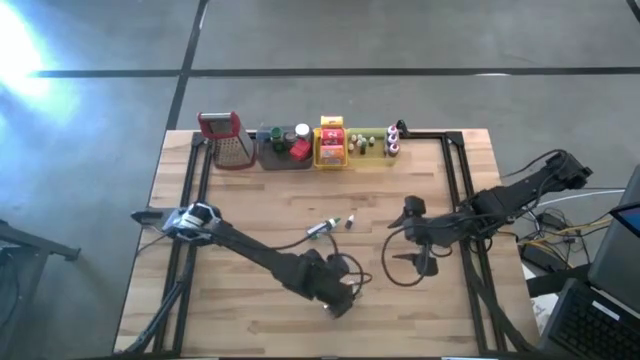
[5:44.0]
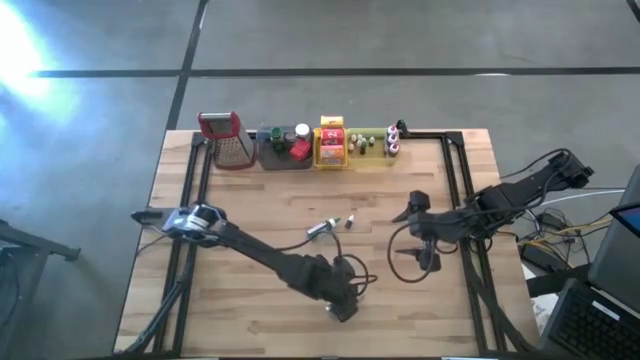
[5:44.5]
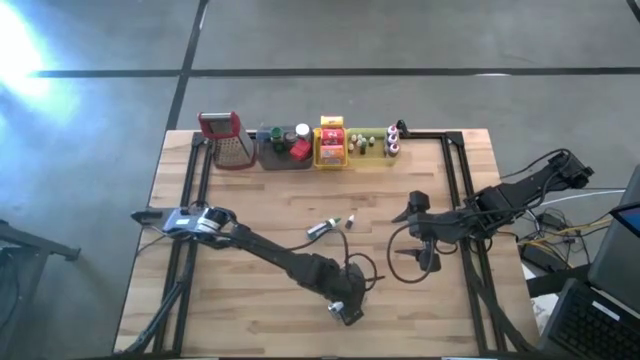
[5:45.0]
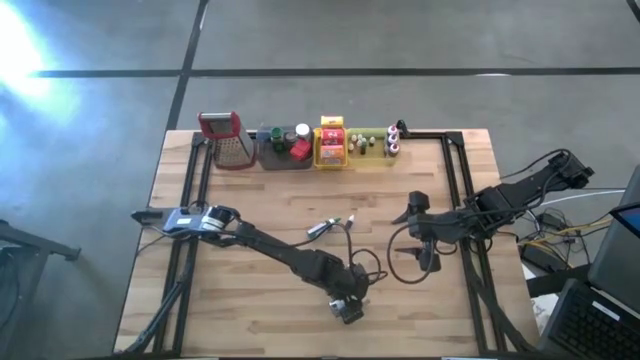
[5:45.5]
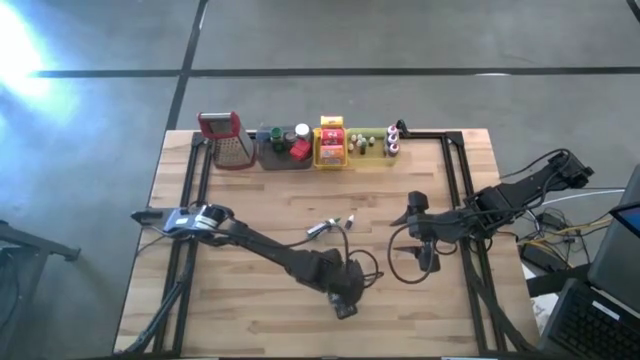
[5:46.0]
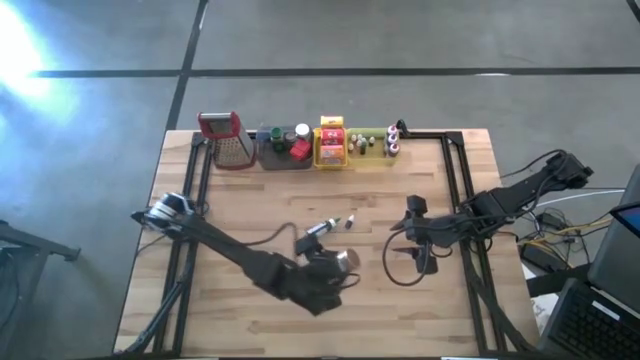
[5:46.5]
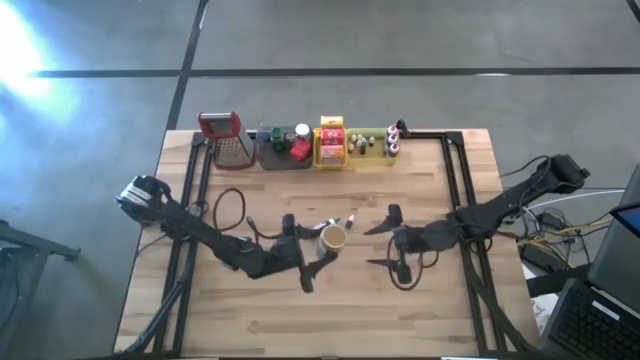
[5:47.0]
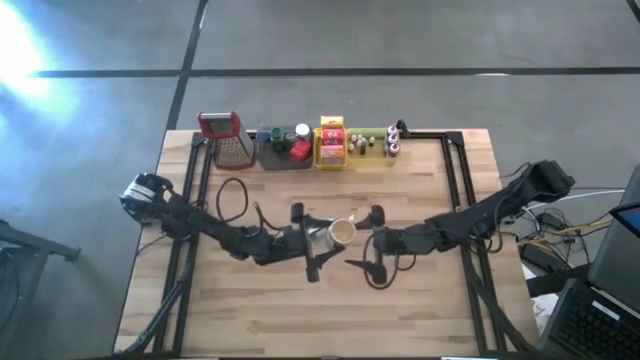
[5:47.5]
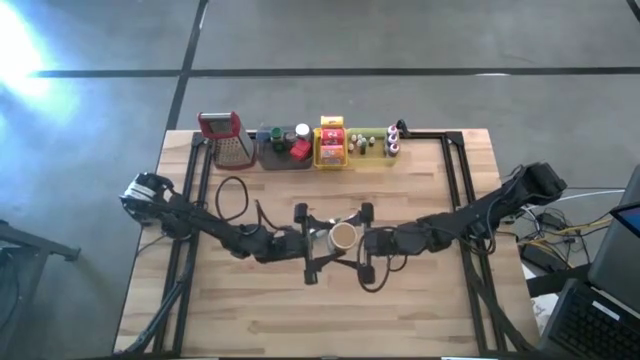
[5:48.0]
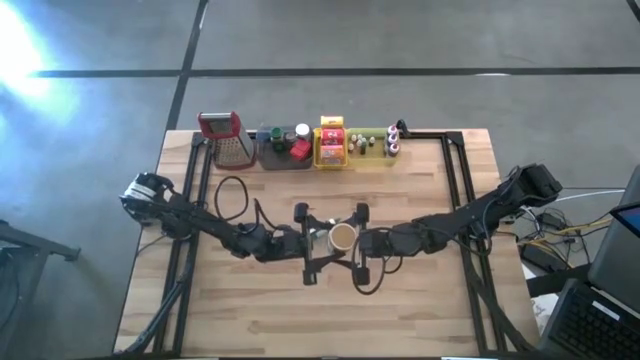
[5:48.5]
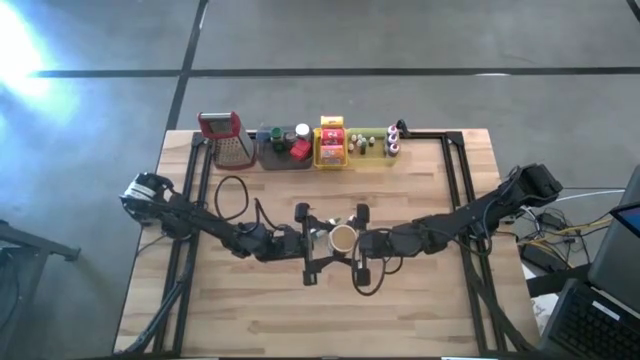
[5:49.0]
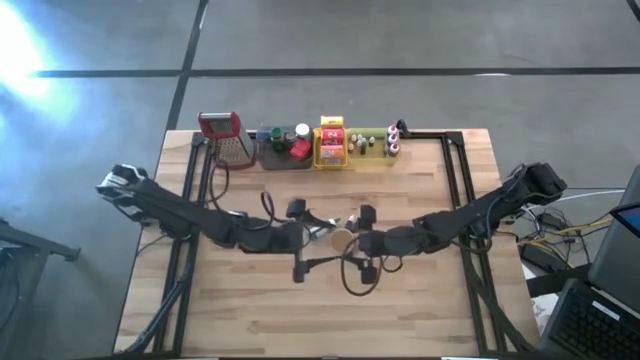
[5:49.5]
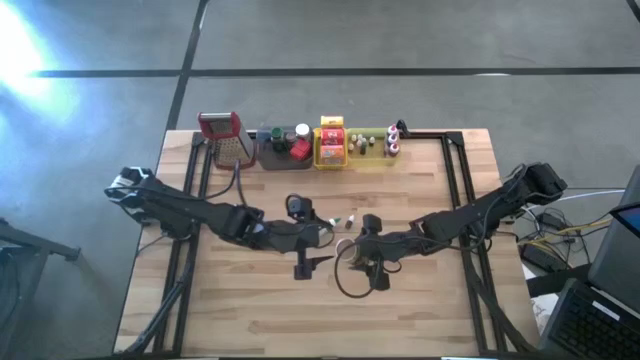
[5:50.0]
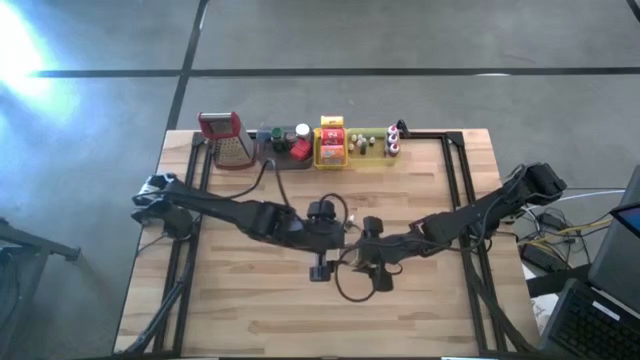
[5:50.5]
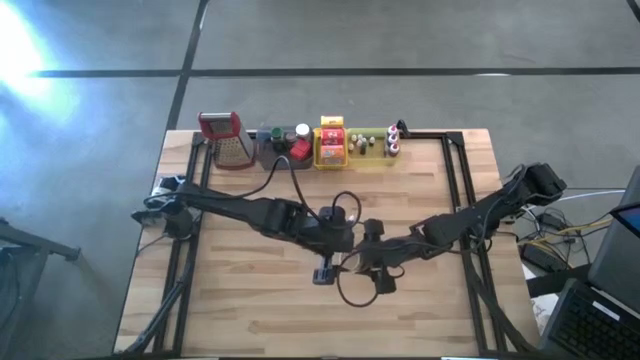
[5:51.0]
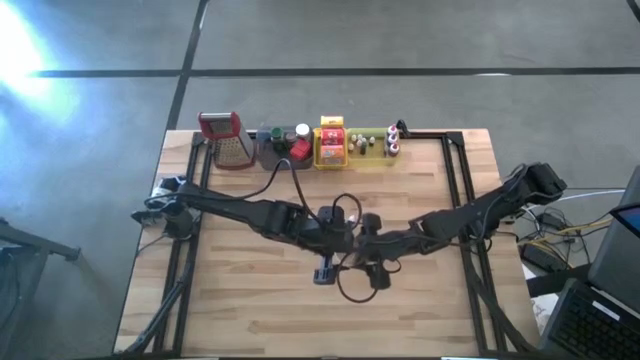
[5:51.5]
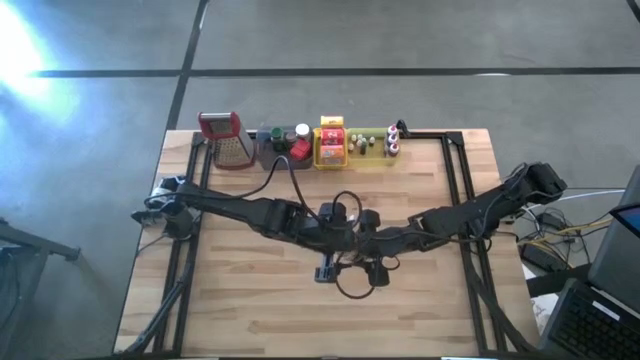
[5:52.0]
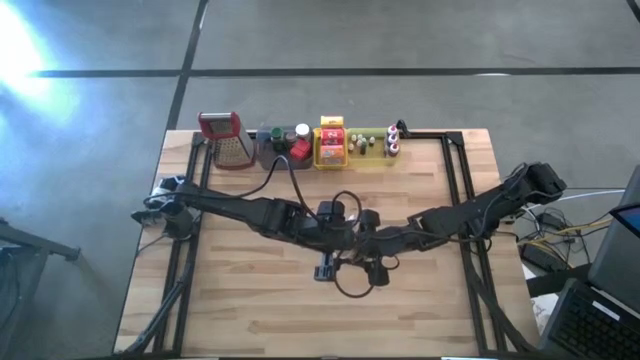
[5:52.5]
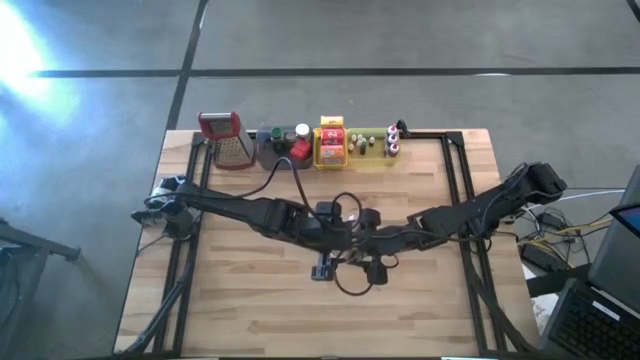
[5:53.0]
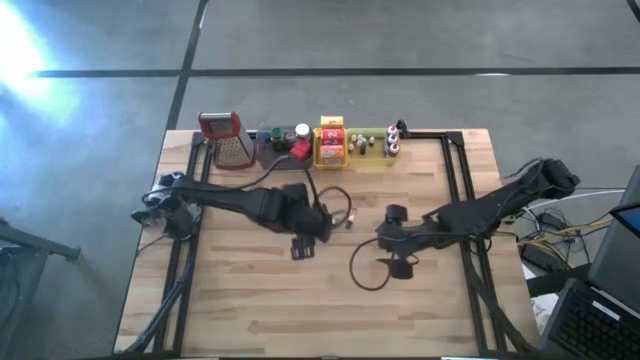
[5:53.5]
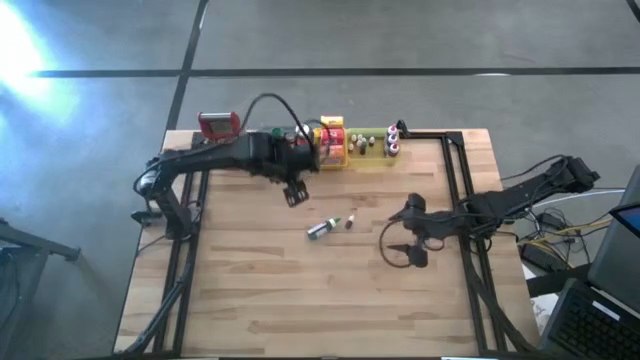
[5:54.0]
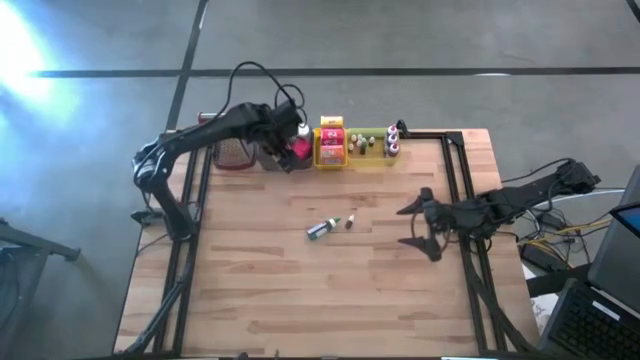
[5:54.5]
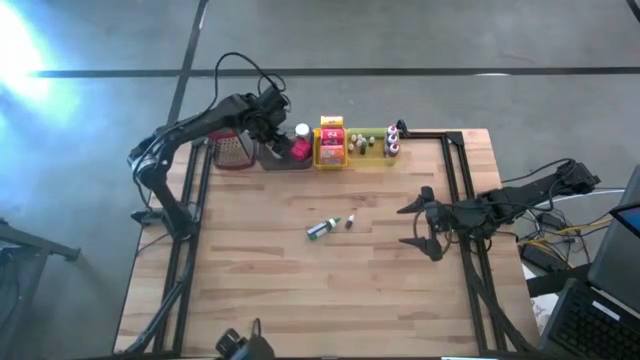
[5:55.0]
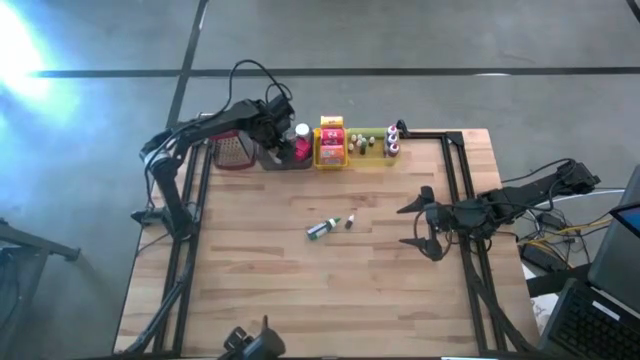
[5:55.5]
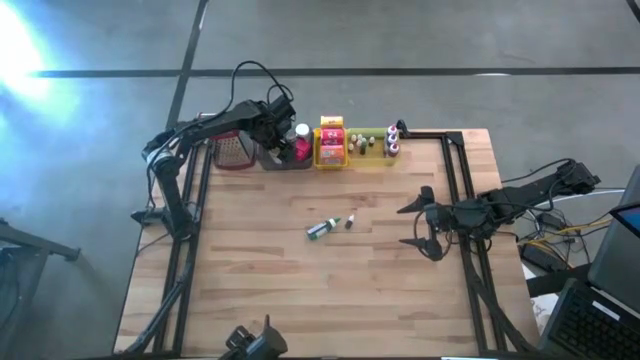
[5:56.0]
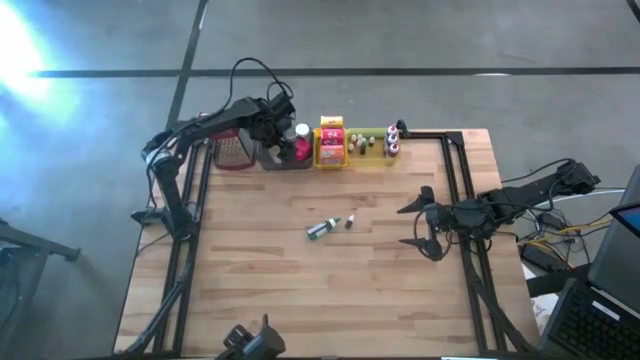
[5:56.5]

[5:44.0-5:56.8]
Task: Pick & Place Kitchen Items
Put the gold seasoning bottle into the black bin

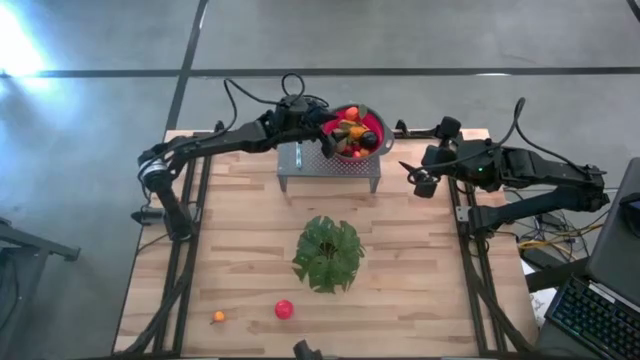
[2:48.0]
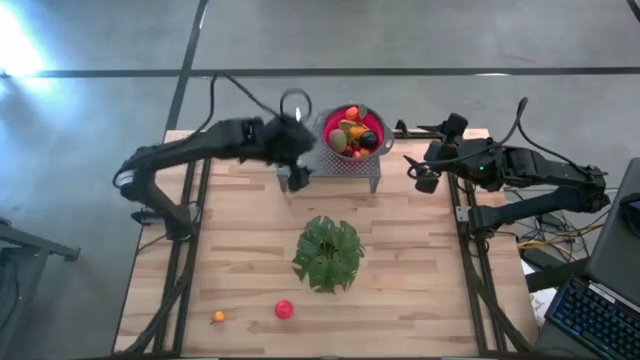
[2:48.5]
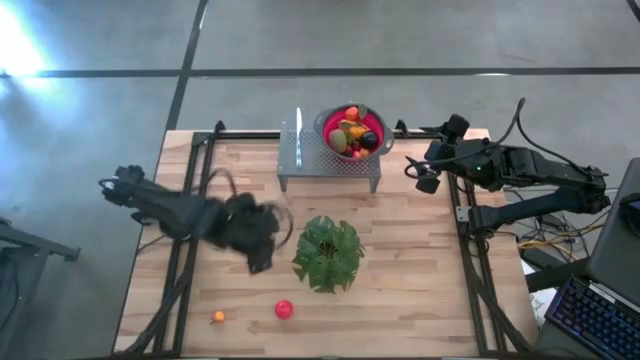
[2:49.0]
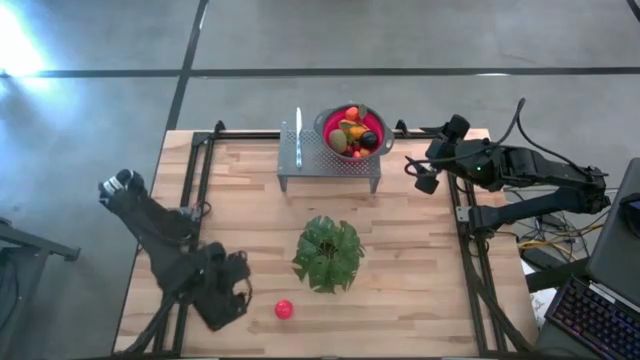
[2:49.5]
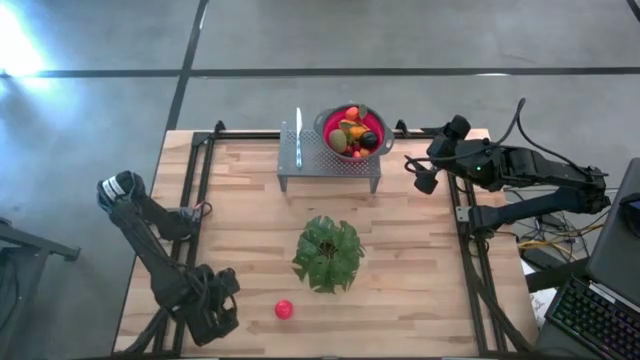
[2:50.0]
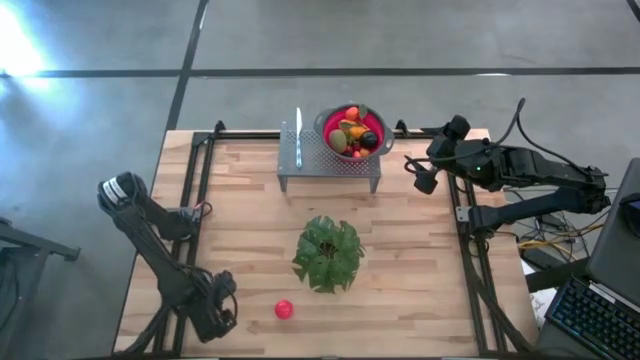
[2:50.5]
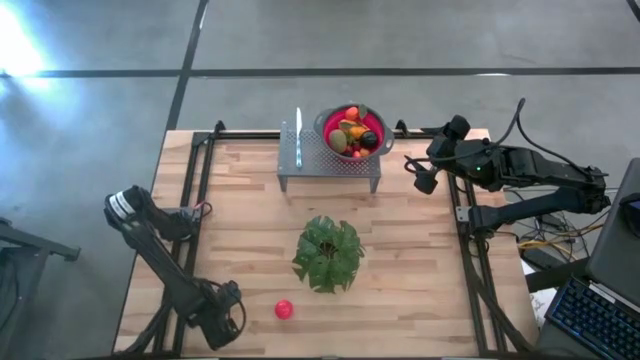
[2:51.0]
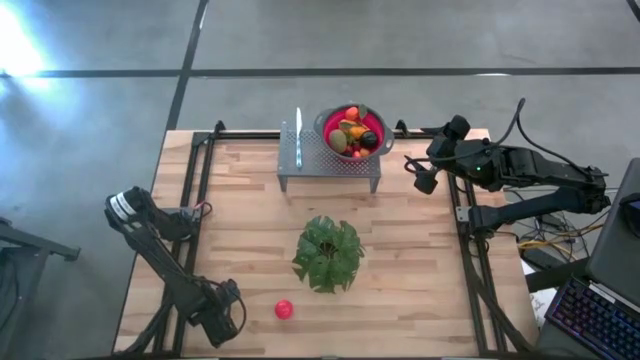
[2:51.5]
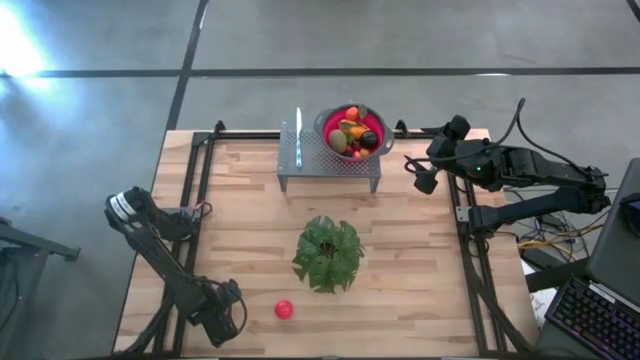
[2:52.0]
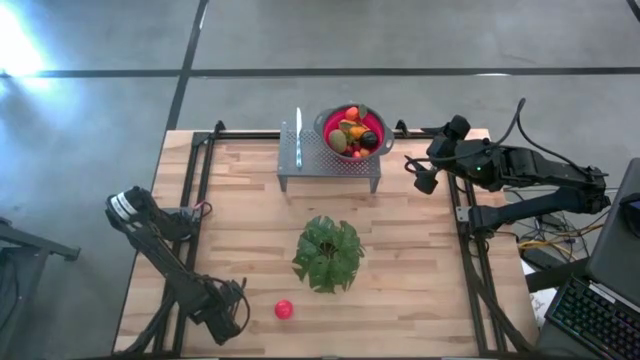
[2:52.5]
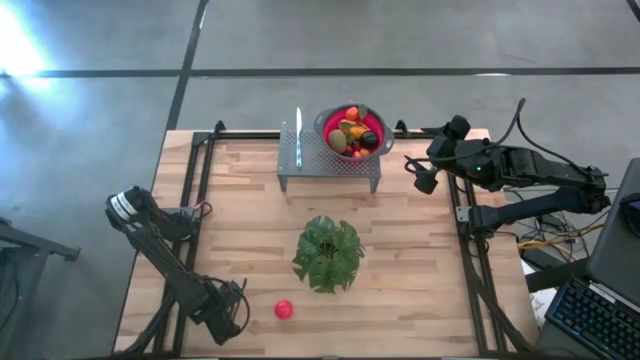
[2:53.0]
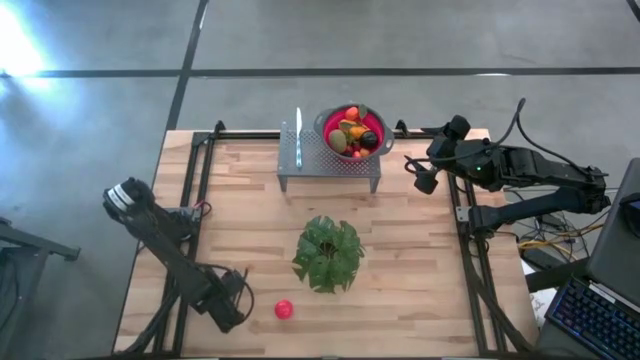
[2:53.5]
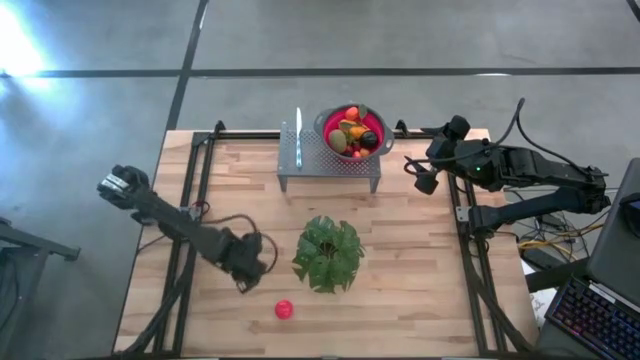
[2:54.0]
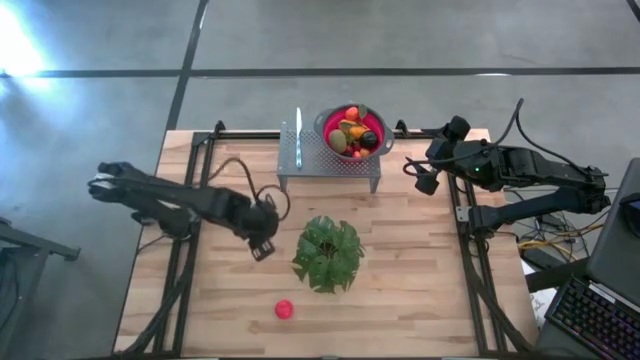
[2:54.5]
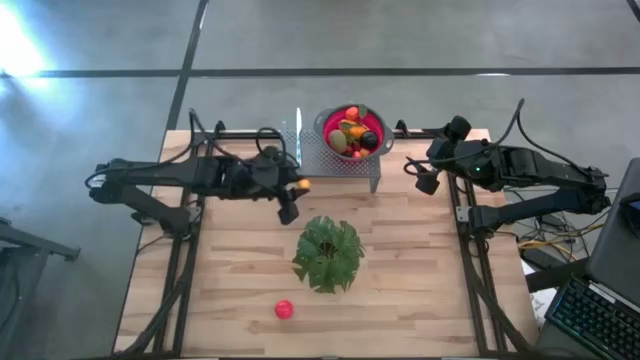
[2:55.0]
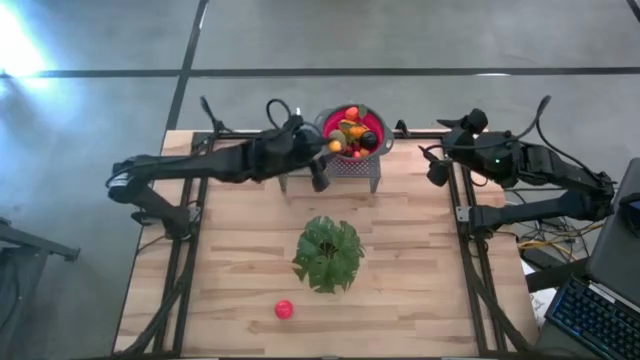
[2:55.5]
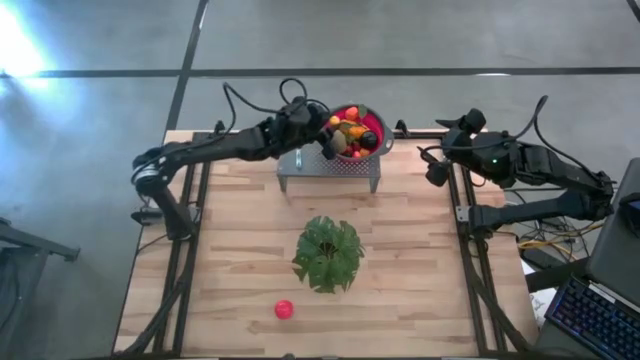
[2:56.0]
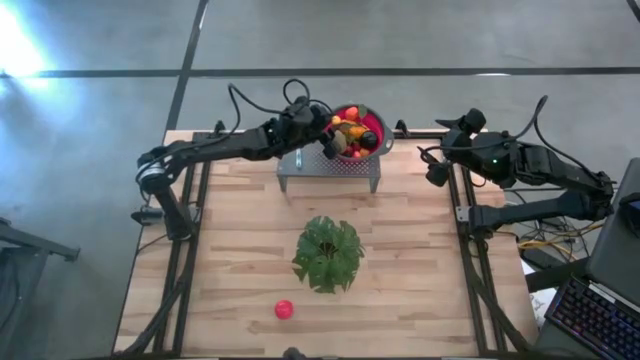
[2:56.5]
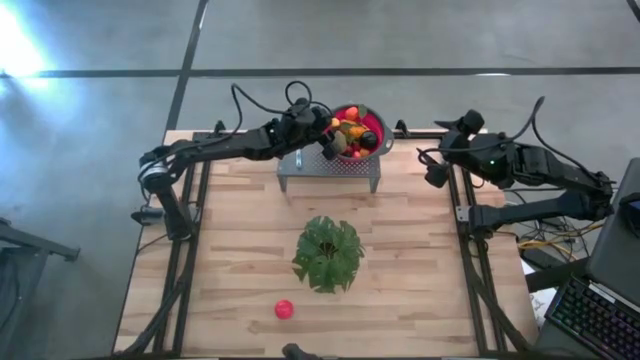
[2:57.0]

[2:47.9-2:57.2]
Task: Pick & Place Fruit
Put the orange pear into the red strainer bowl on the shelf
